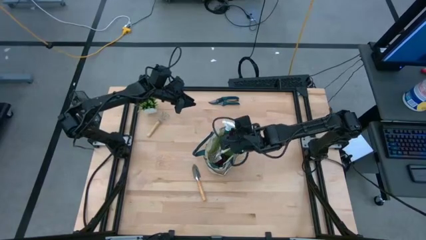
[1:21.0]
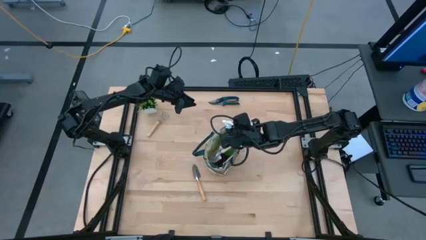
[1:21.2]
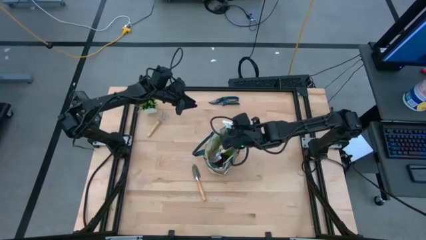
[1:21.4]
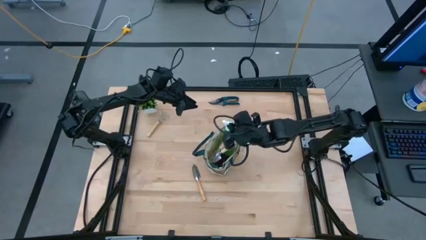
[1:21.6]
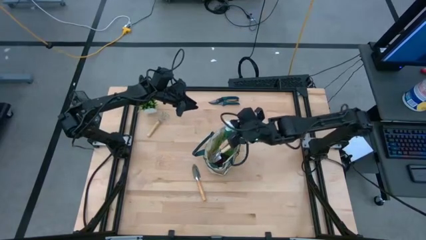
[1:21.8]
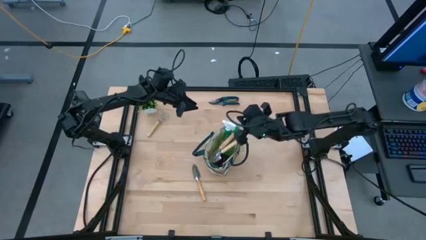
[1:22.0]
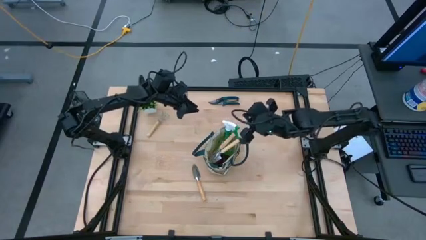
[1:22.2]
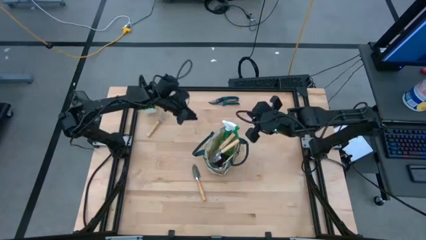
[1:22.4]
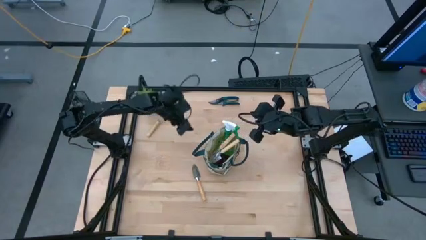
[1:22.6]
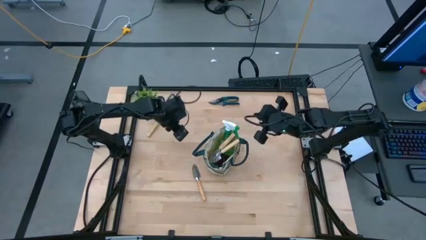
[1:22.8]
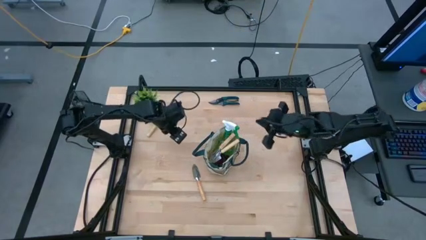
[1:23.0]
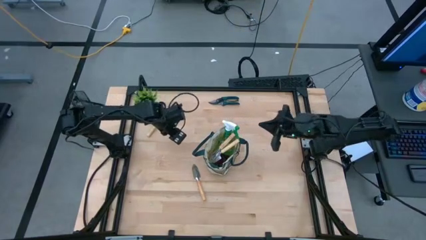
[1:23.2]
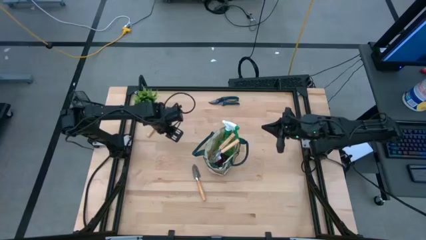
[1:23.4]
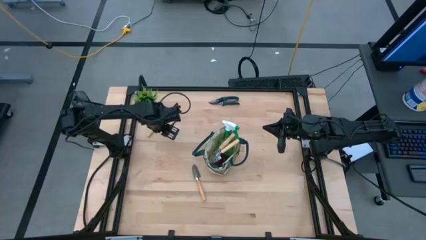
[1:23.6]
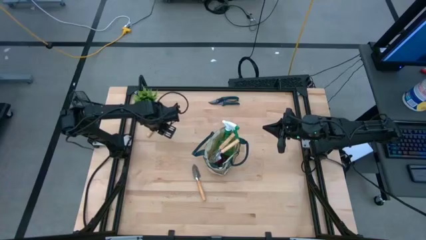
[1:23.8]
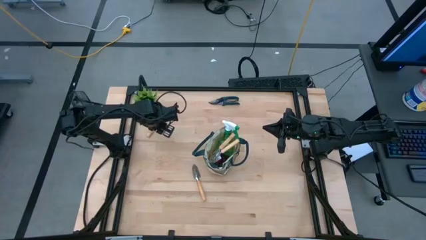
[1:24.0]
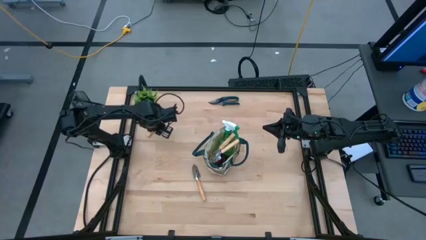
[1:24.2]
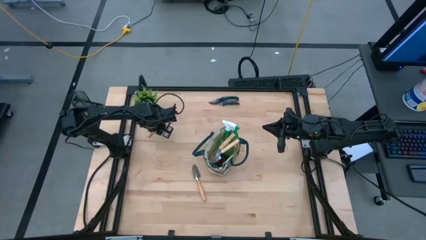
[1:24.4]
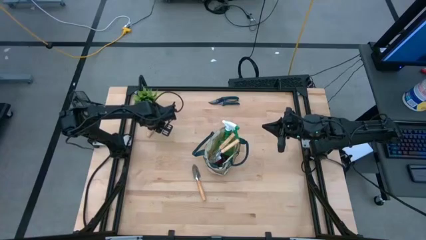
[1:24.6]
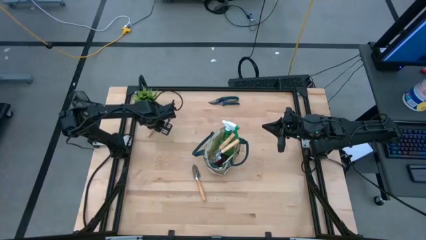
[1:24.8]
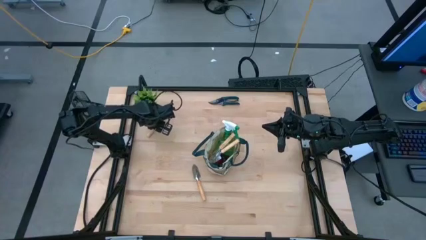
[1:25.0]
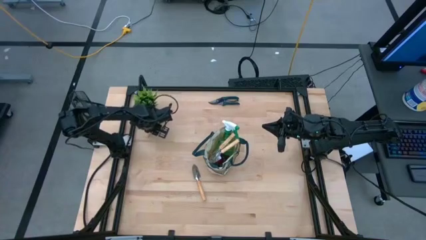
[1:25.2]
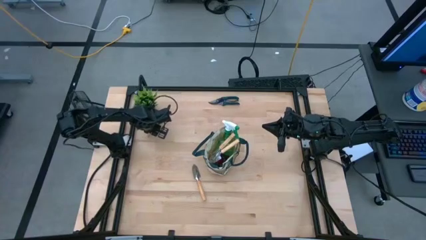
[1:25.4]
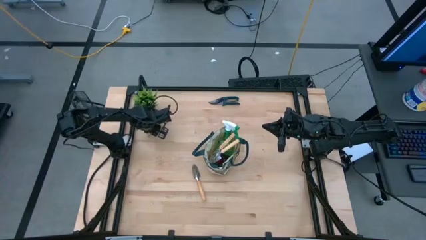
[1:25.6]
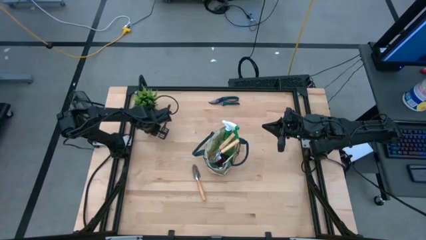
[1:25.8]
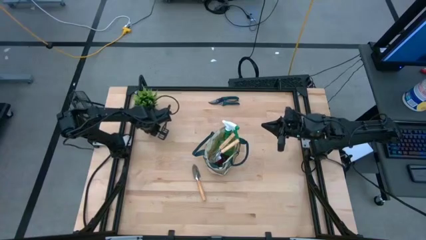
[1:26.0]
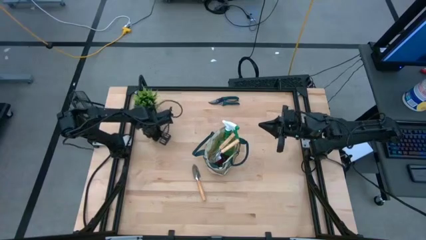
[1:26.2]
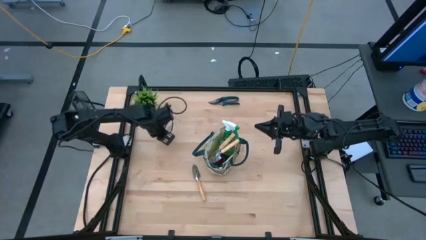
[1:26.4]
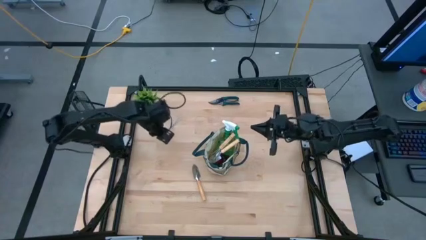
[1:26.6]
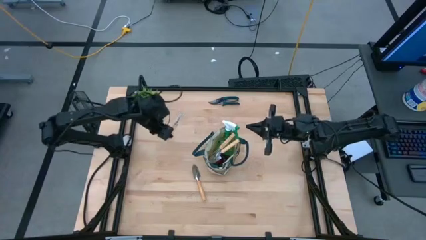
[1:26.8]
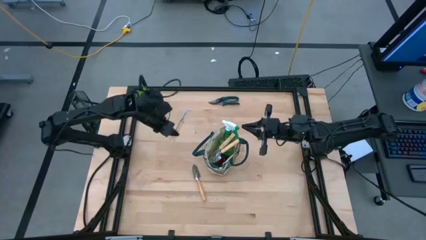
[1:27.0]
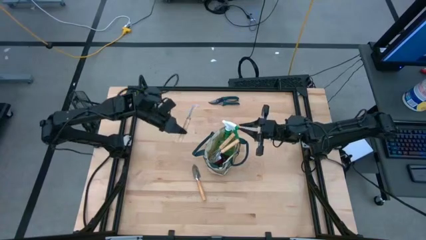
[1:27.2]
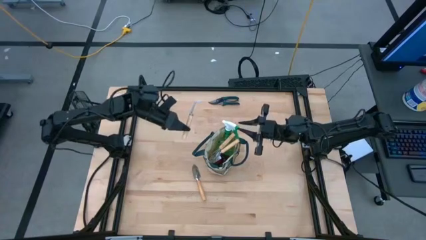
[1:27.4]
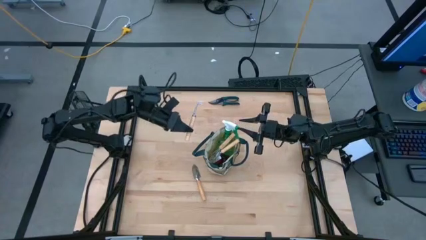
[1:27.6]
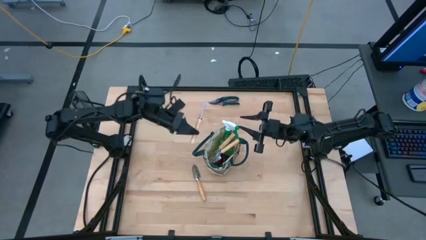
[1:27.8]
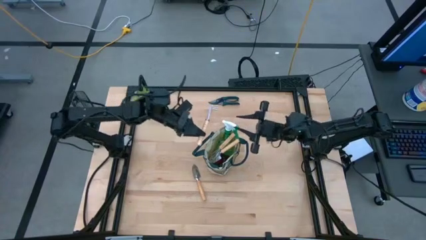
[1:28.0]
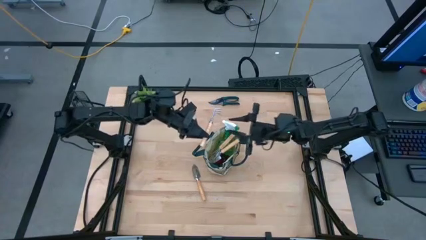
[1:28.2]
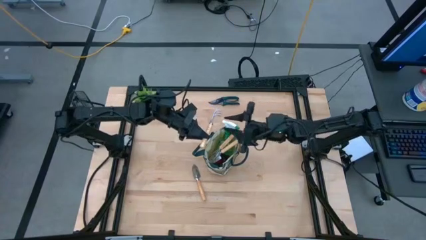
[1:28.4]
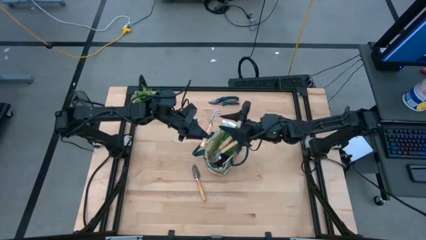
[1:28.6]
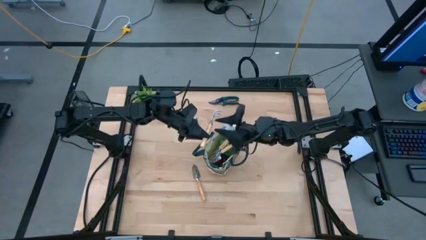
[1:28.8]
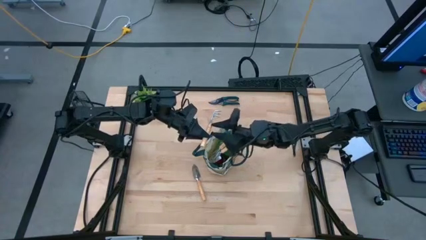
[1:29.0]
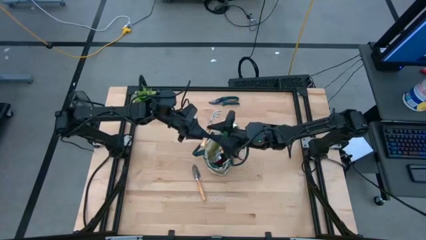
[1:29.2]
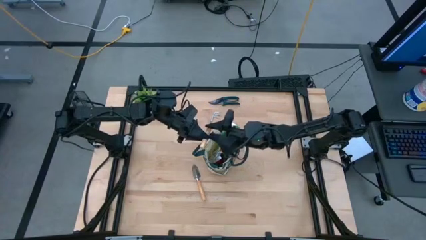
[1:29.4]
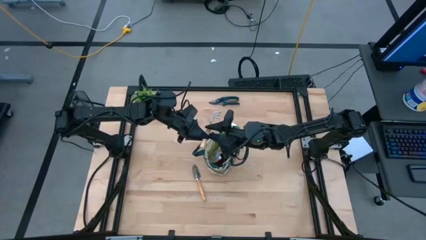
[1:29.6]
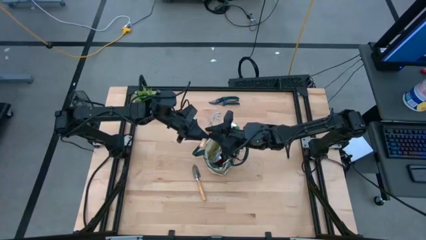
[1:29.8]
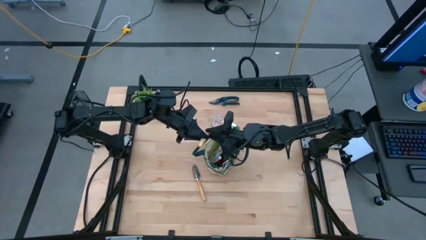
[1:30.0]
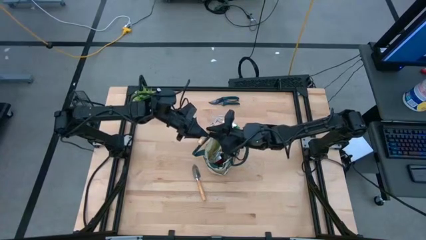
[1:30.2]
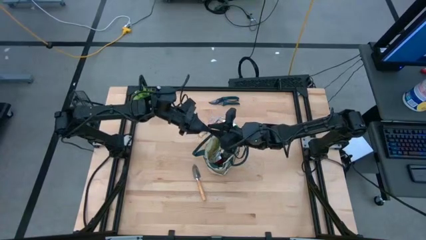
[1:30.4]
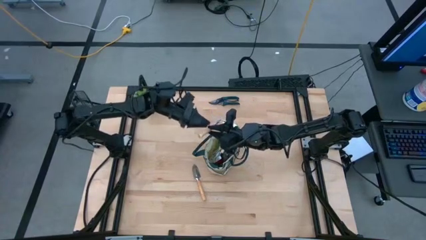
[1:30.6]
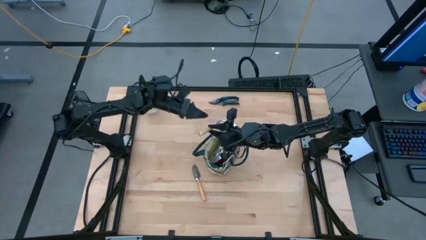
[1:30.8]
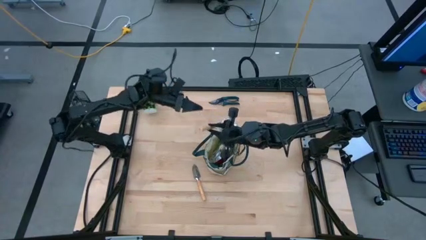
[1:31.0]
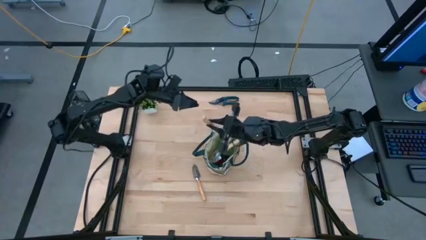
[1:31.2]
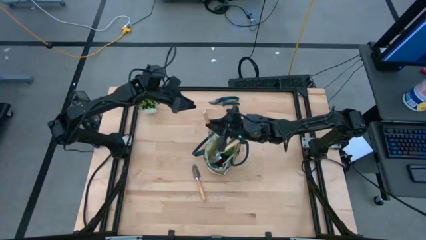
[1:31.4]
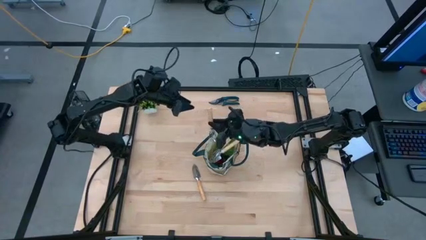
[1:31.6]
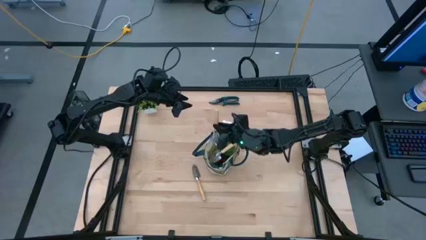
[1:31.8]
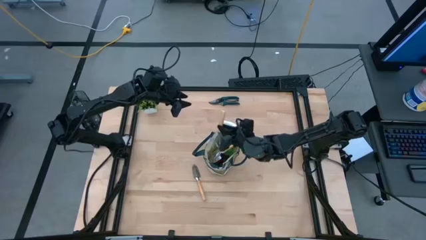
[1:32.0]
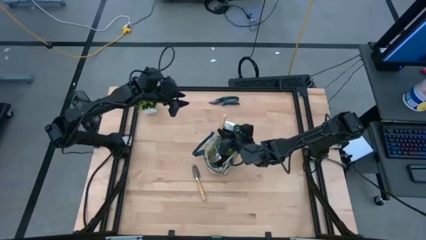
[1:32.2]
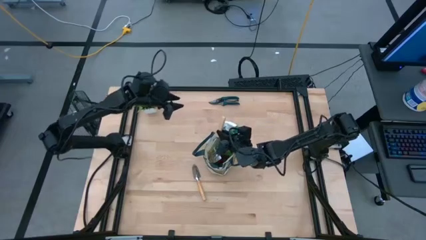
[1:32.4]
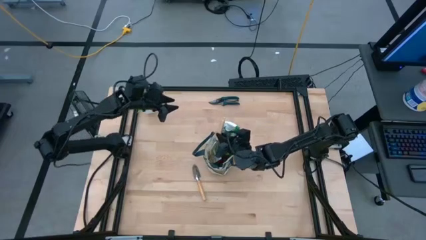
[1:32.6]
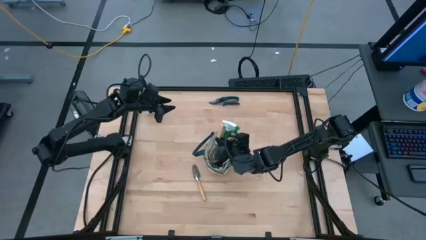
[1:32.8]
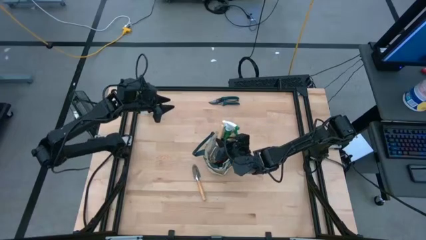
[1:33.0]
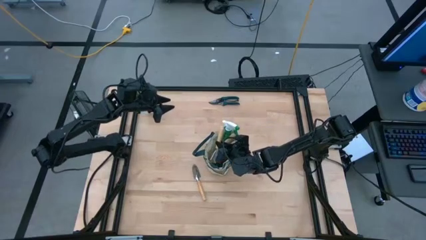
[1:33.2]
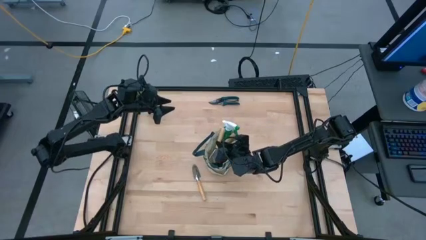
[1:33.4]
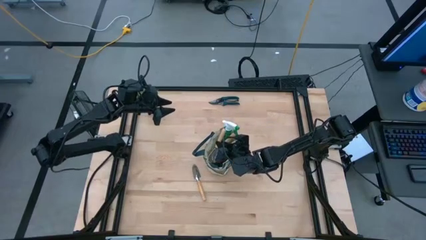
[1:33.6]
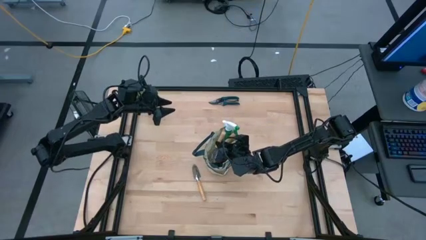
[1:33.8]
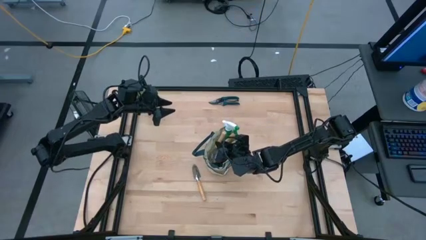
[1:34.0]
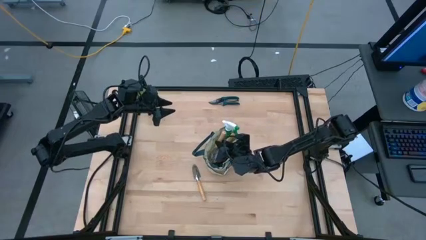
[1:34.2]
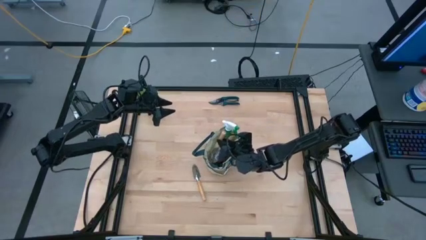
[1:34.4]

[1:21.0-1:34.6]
Task: Pick & Place Garden tools in Gardening bag
Put the brown hand rake into the gardening bag

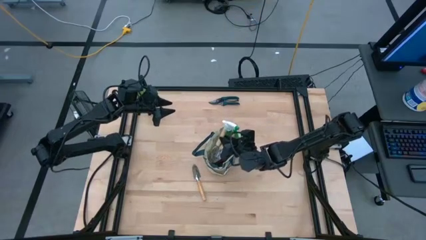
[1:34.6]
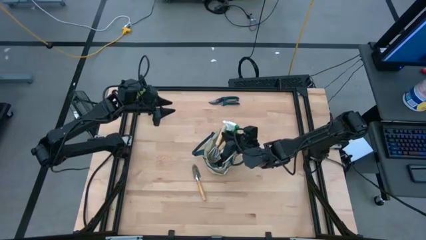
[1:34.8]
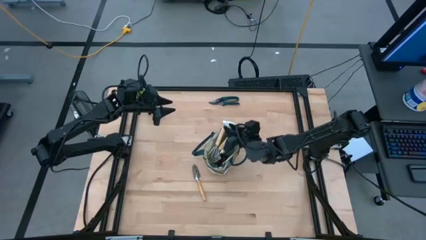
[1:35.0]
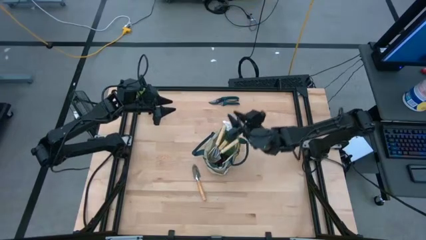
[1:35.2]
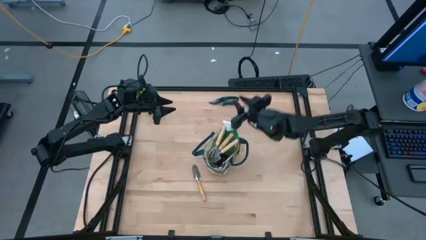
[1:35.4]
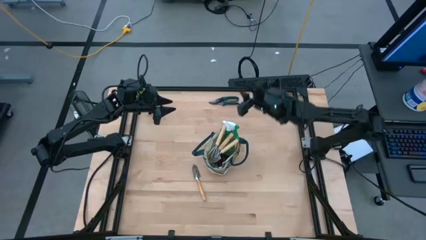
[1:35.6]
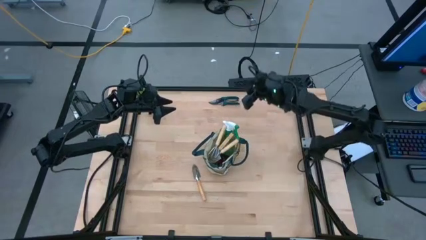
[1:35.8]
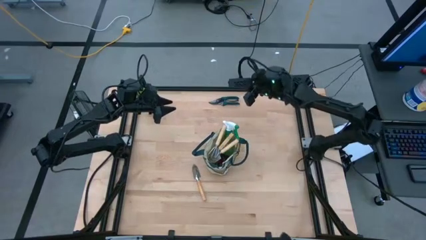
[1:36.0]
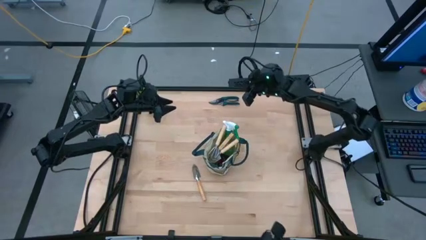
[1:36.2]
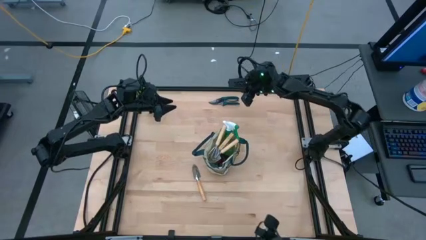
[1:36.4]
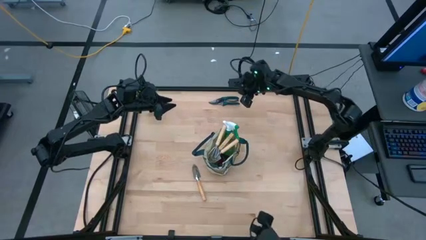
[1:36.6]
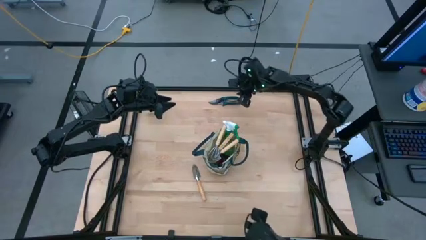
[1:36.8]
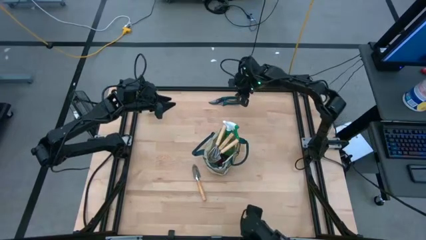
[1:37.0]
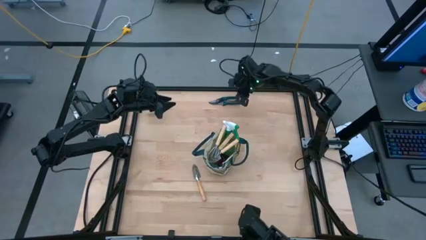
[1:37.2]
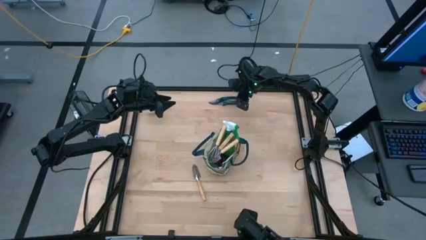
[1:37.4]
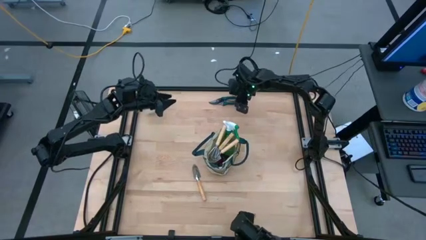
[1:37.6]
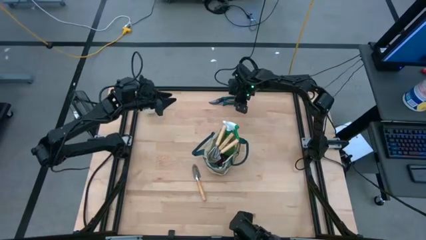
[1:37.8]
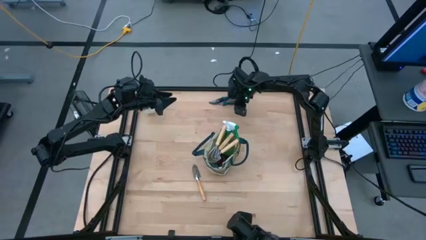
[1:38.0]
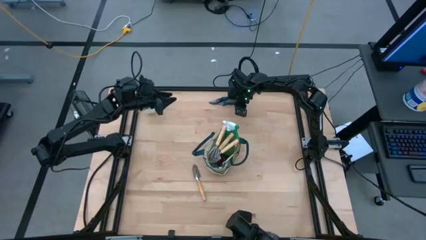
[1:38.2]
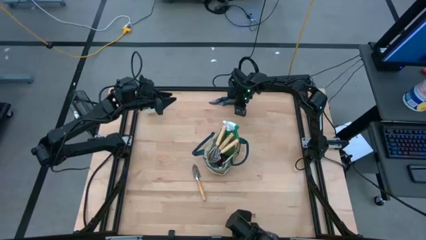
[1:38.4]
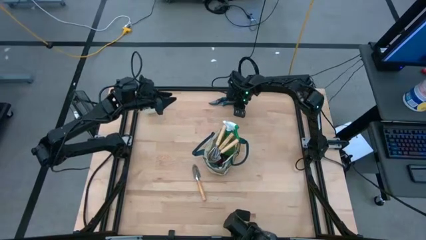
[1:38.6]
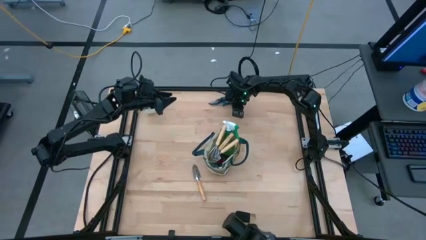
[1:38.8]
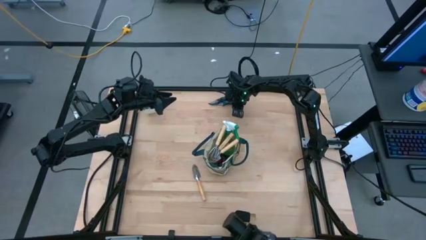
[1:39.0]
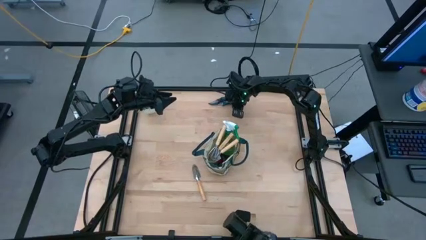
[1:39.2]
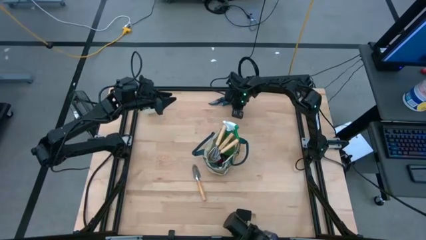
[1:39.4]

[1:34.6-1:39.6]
Put the green shear scissors into the gardening bag
